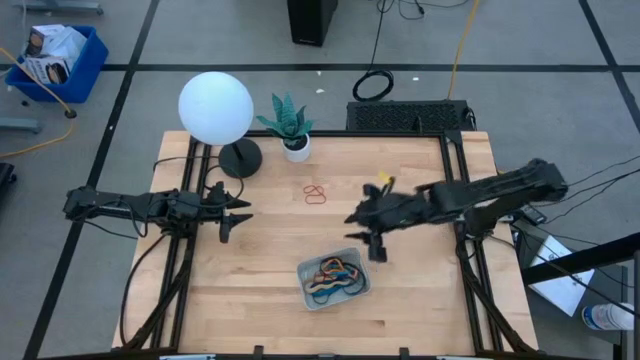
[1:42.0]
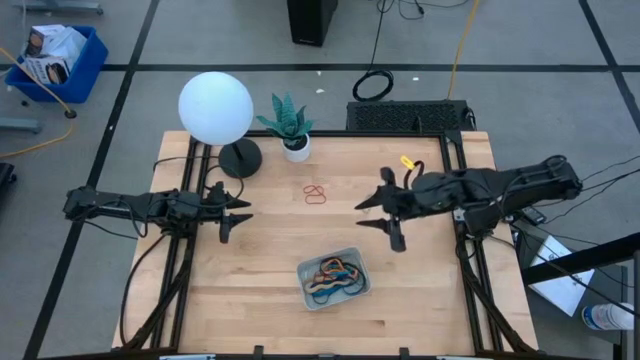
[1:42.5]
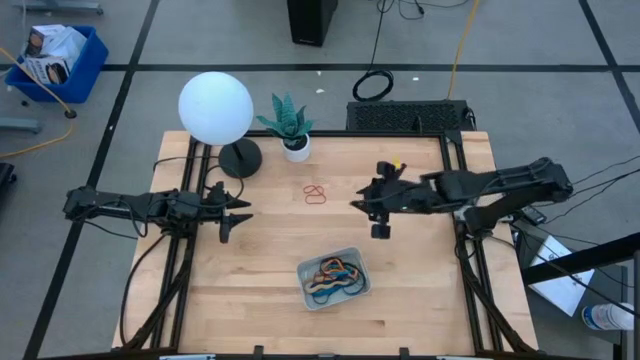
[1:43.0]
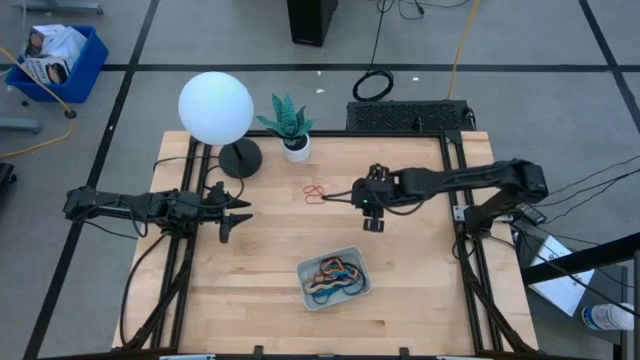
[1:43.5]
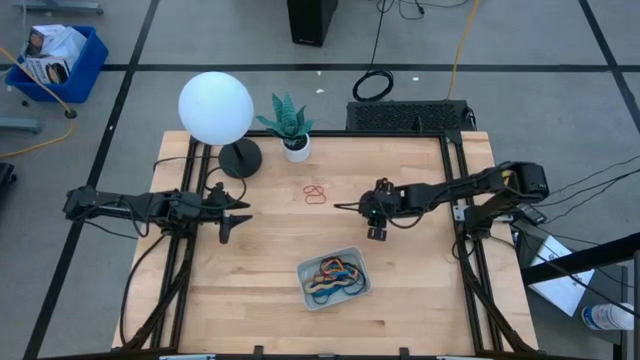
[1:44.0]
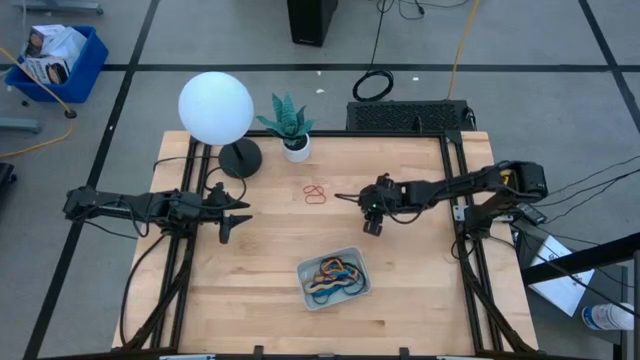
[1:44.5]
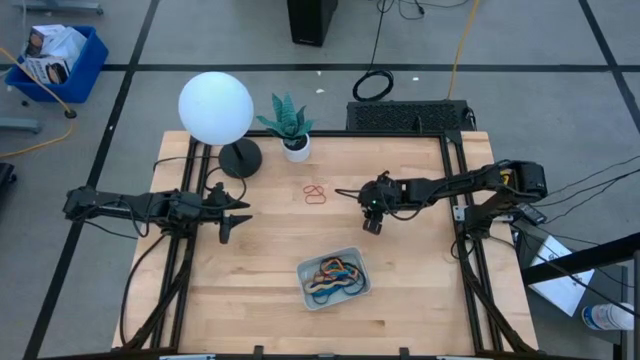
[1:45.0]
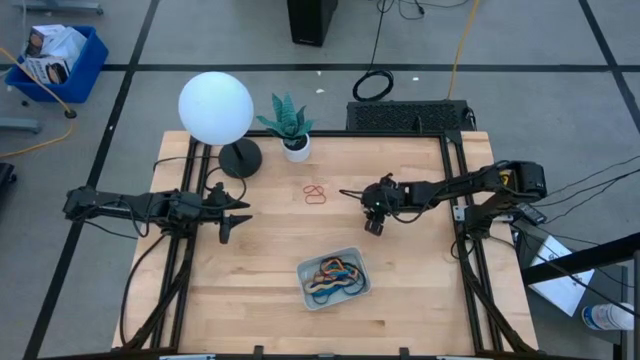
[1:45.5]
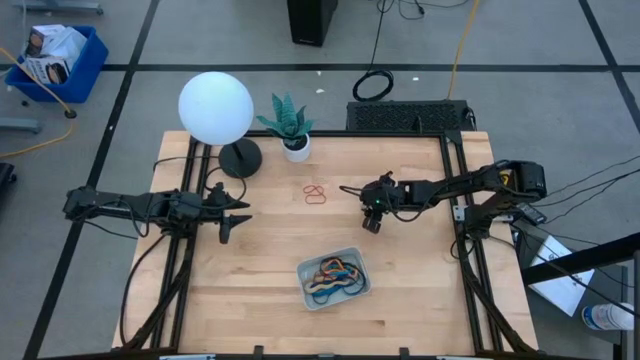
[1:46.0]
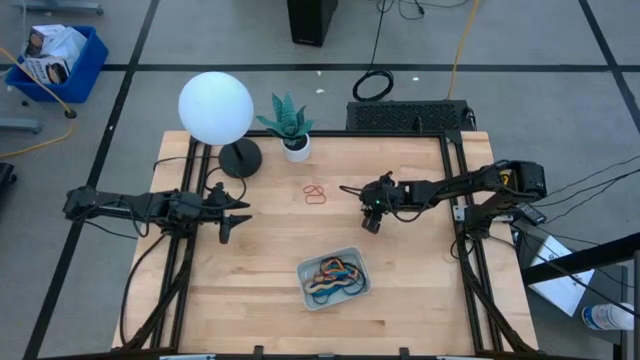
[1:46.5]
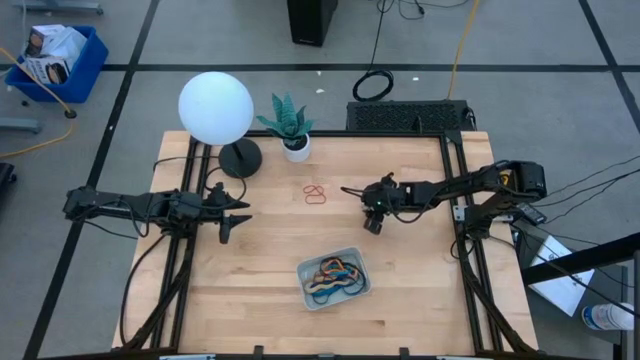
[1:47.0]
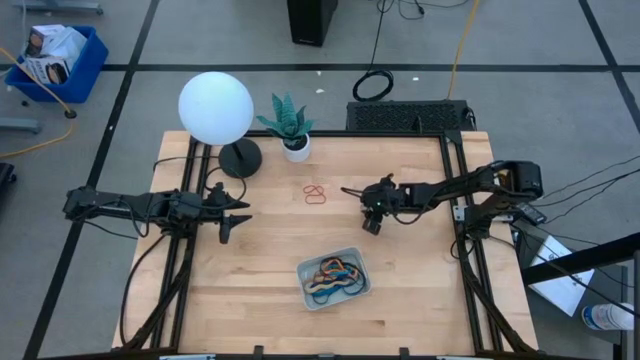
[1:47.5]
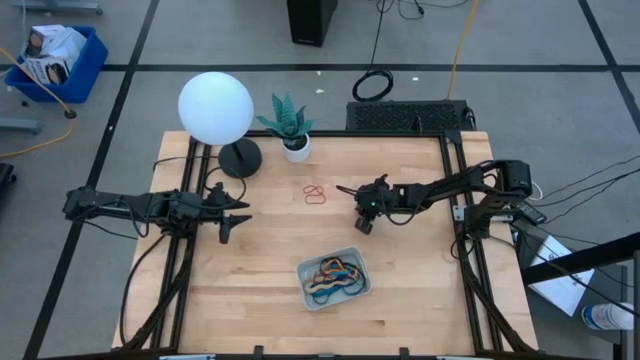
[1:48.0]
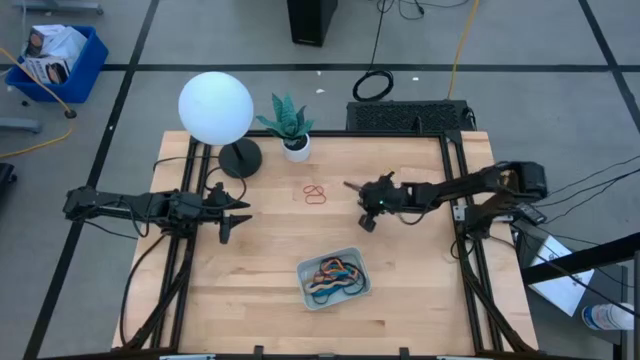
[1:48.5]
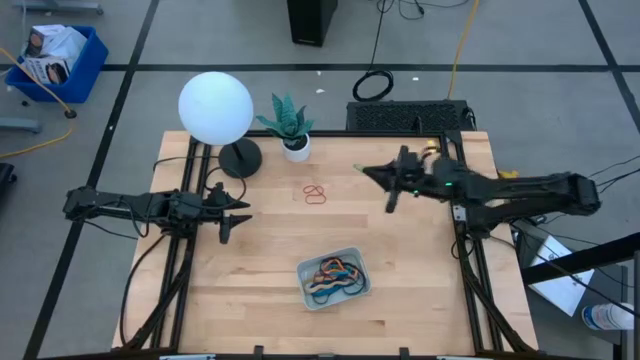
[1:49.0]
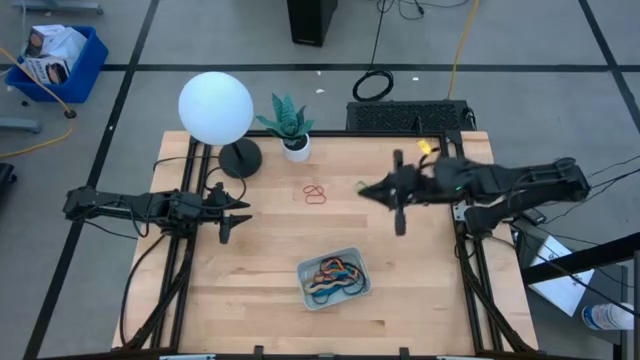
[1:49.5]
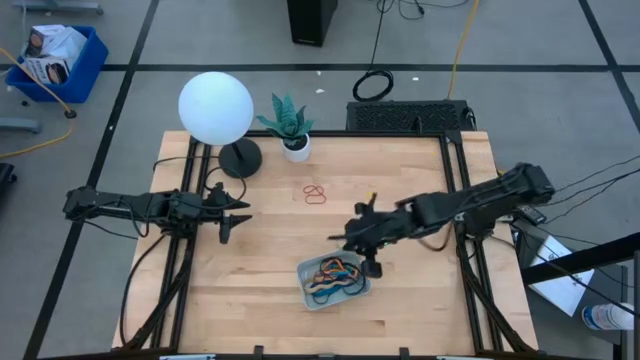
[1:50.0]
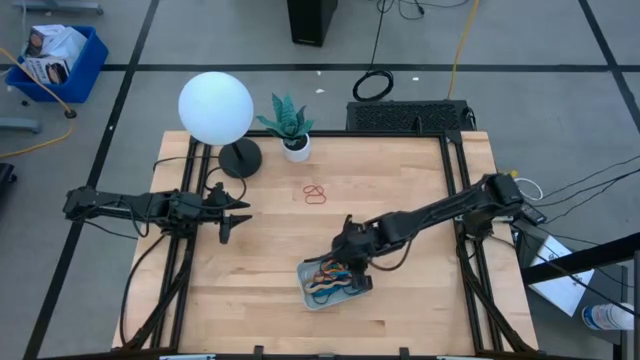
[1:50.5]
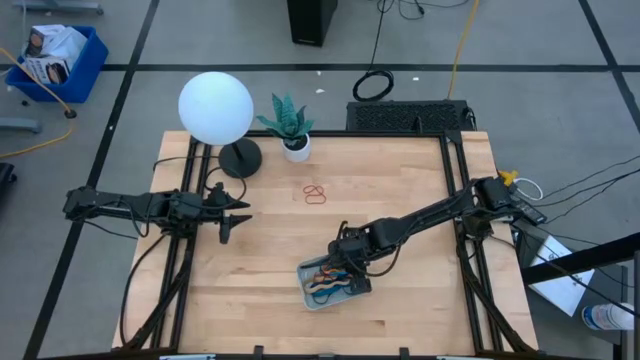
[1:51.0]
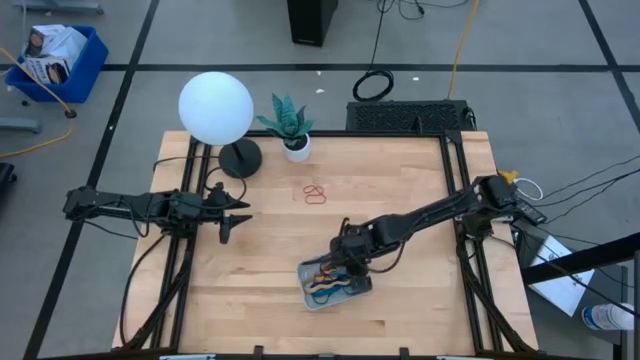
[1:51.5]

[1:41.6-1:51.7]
Task: Pick and place rubber bands into bin
Put the green rubber band into the gray bin

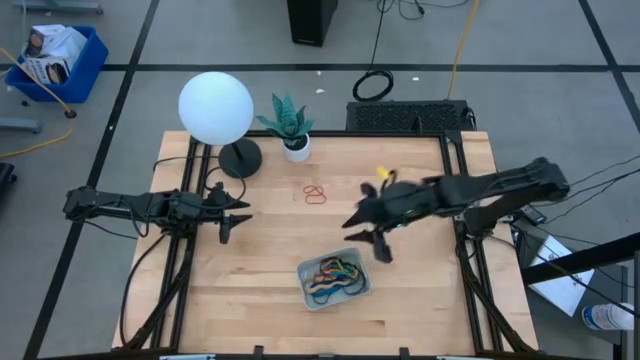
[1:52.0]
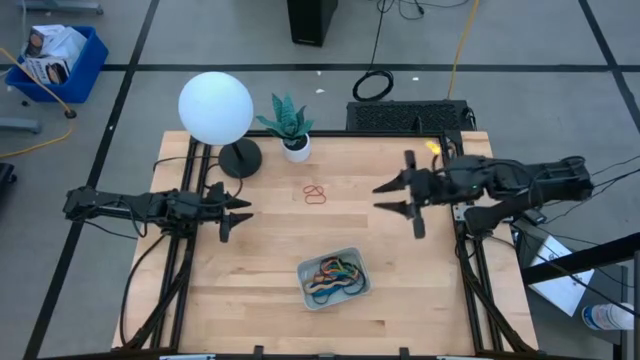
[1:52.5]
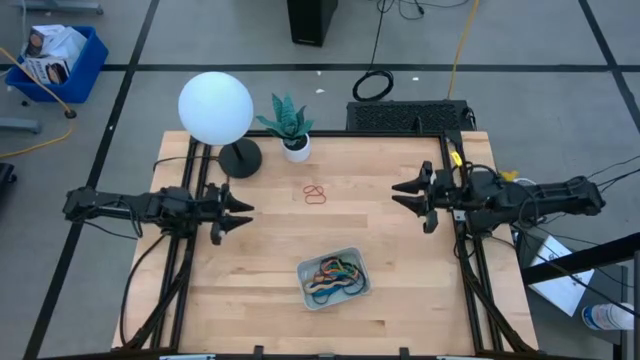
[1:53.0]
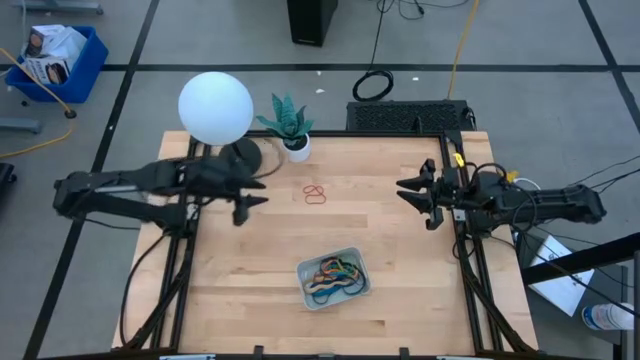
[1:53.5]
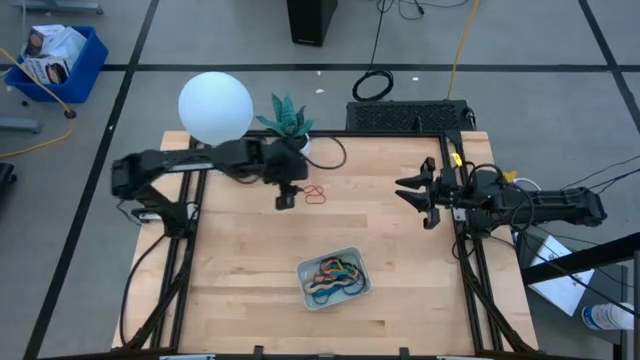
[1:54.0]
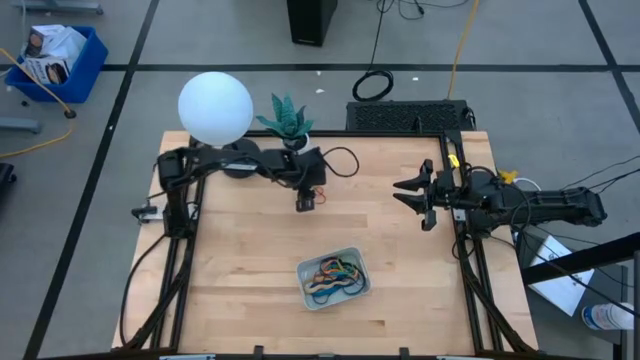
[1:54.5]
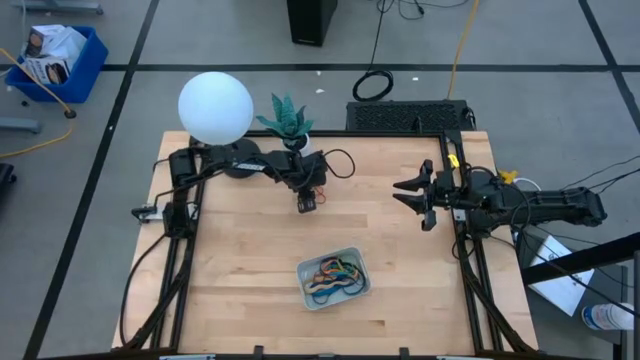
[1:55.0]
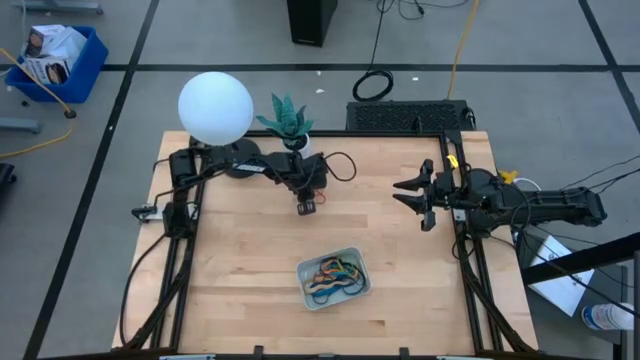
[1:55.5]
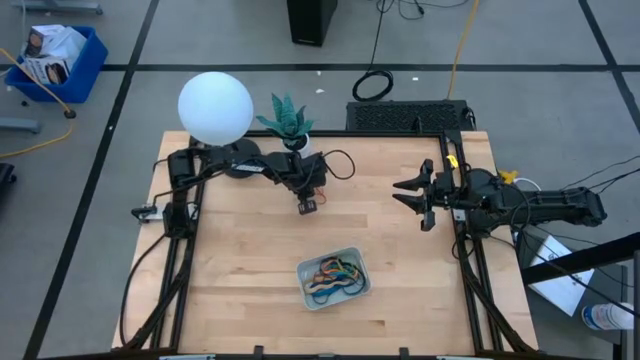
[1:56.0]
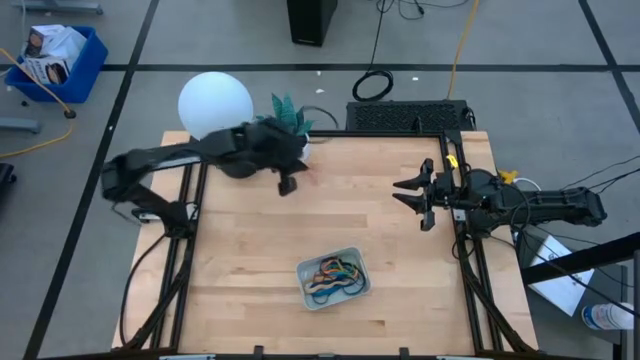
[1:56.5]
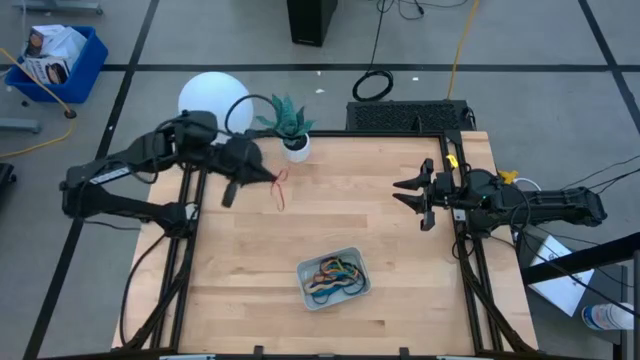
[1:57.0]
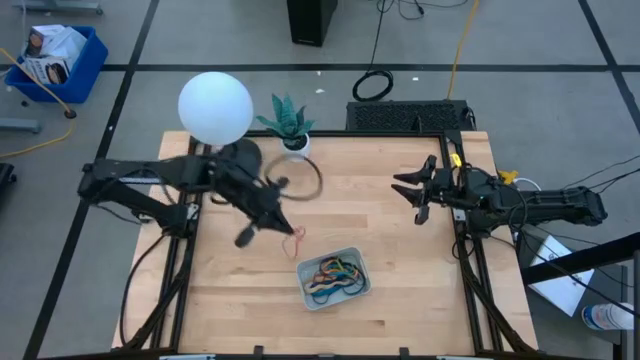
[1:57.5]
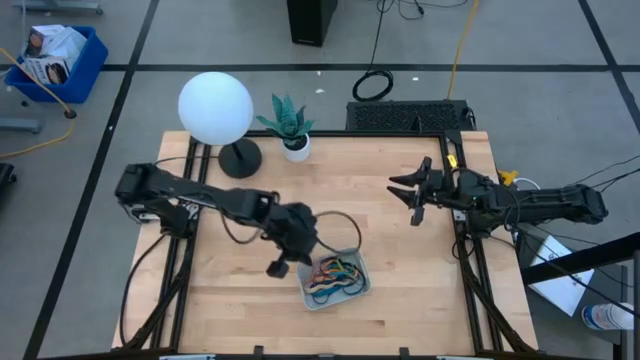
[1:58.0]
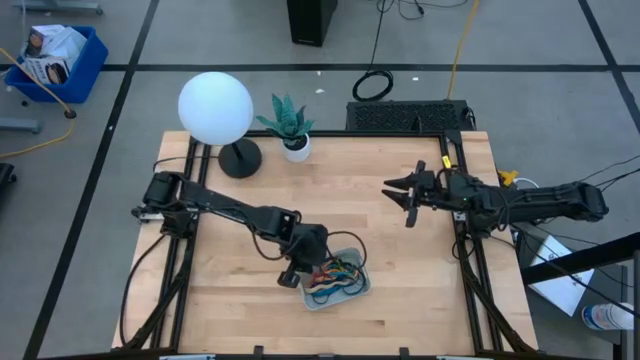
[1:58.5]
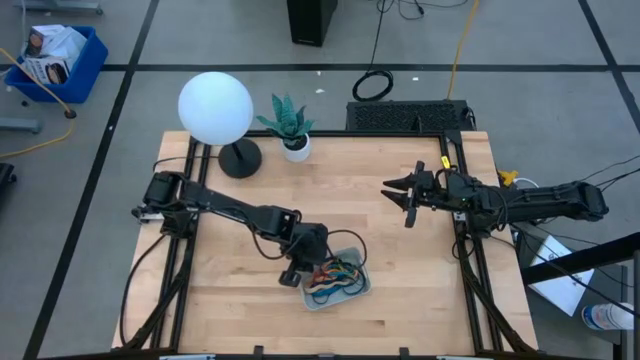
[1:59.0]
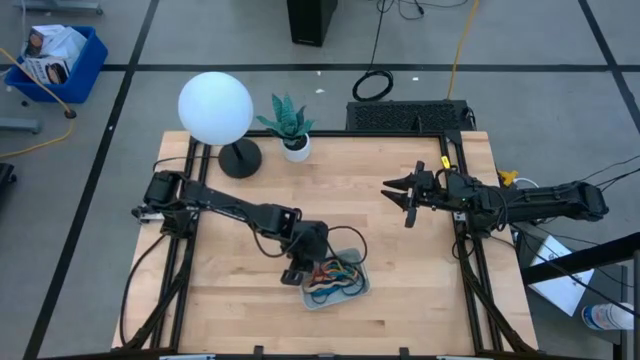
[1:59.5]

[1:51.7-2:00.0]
Put the red rubber band into the gray bin

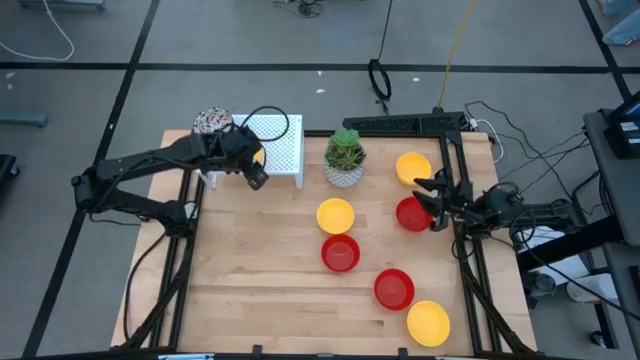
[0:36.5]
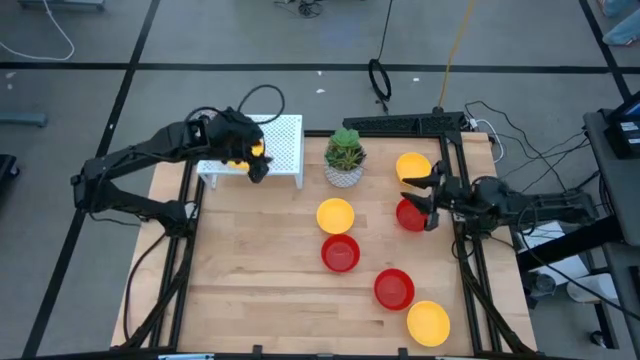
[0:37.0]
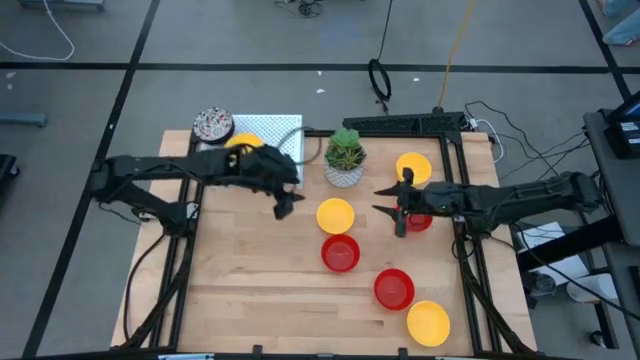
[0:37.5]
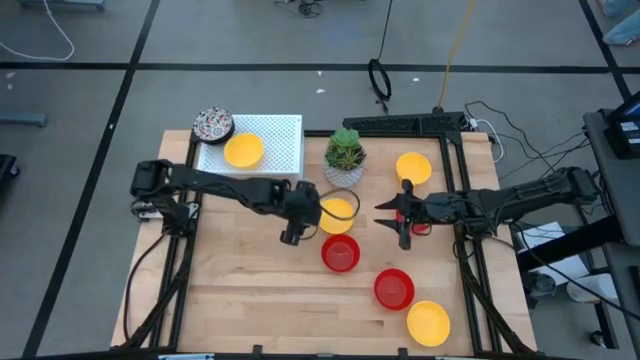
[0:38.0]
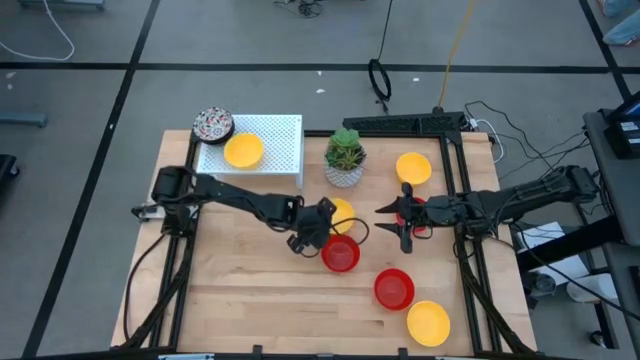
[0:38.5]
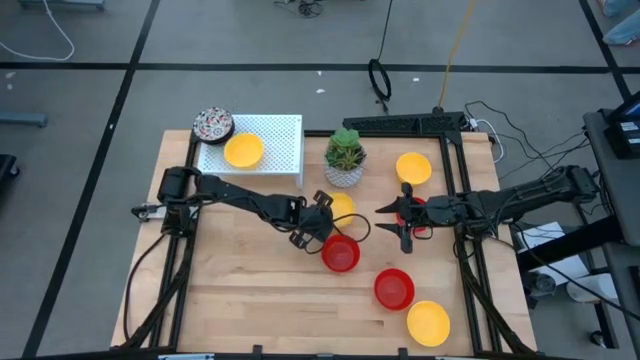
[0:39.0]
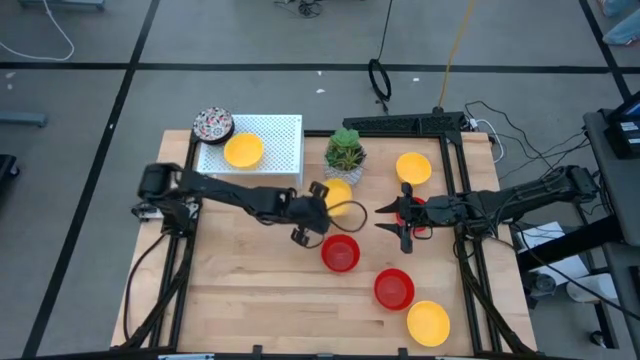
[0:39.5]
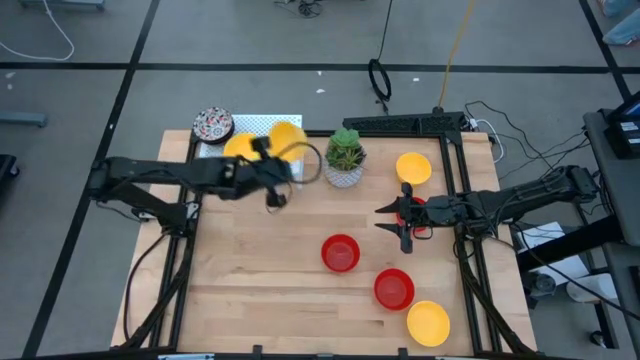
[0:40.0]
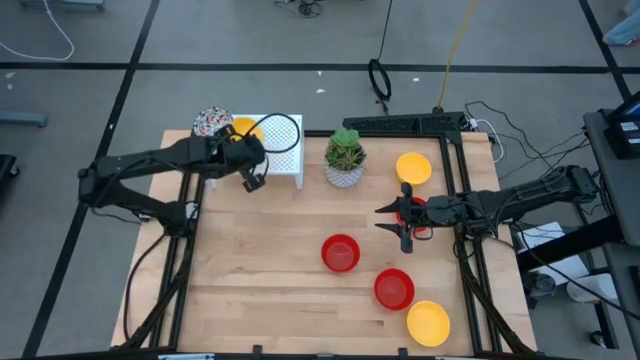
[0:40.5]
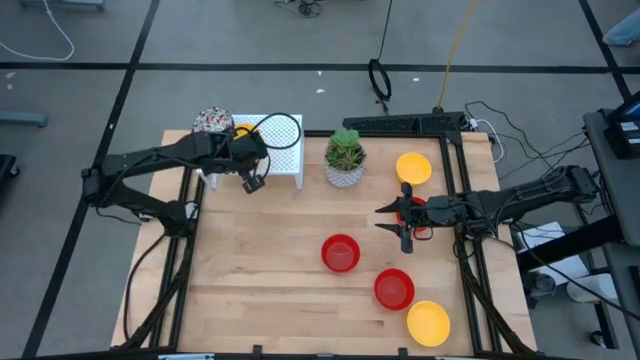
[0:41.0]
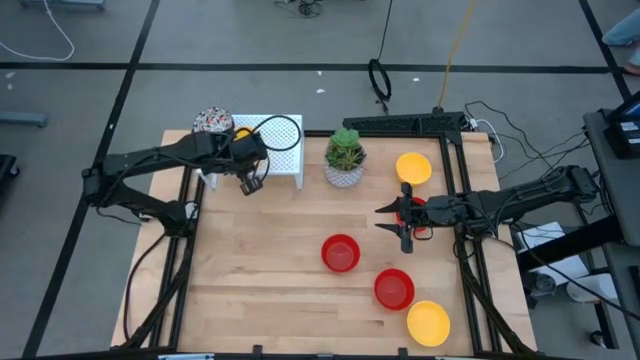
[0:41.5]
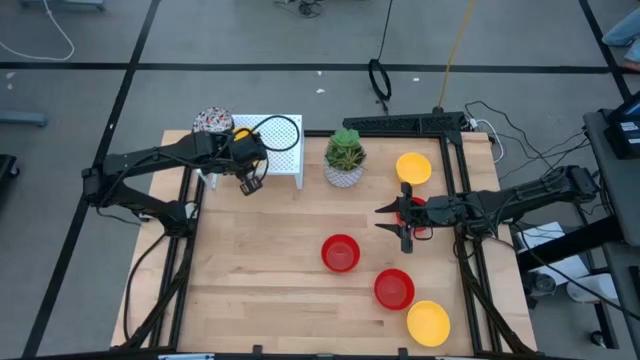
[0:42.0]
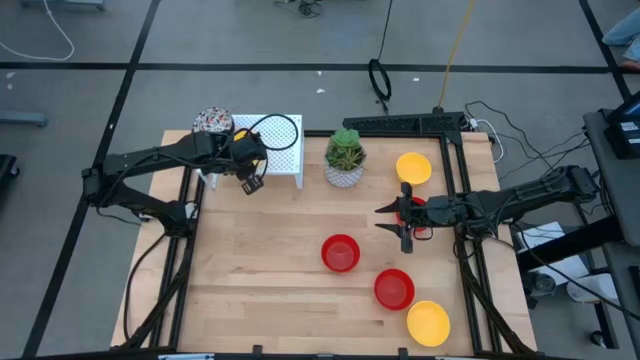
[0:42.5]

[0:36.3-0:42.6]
Task: Pick & Place Mini bowls
Stack the yellow bowl on top of the yellow bowl on the shelf
